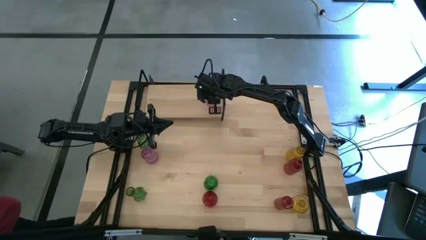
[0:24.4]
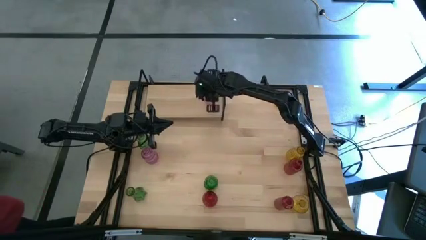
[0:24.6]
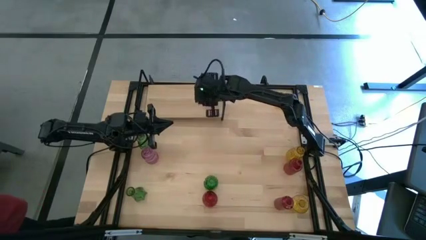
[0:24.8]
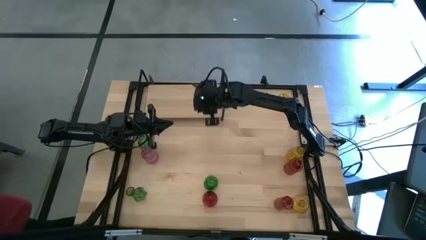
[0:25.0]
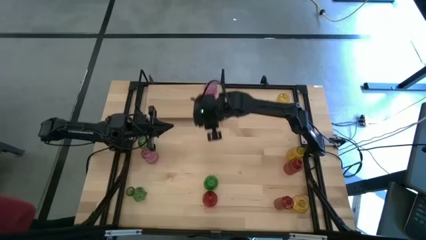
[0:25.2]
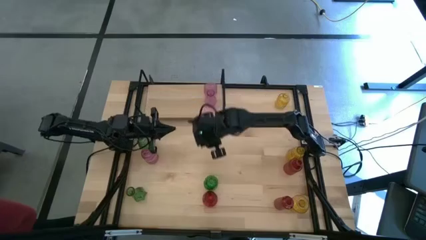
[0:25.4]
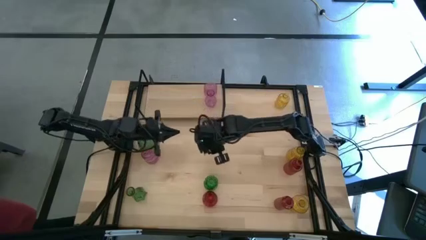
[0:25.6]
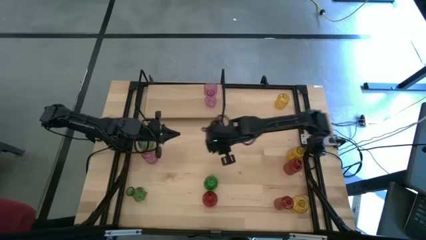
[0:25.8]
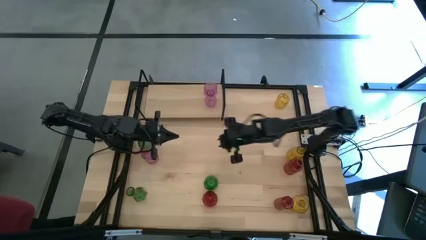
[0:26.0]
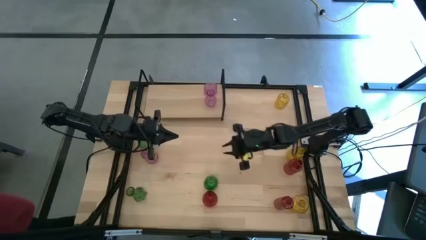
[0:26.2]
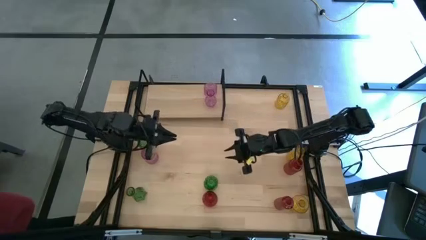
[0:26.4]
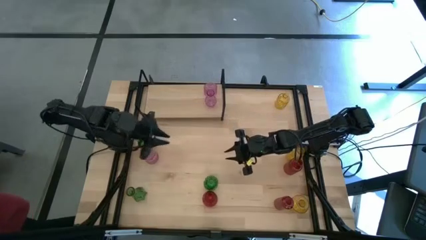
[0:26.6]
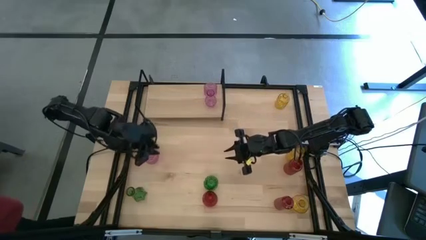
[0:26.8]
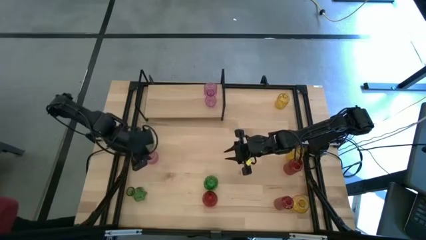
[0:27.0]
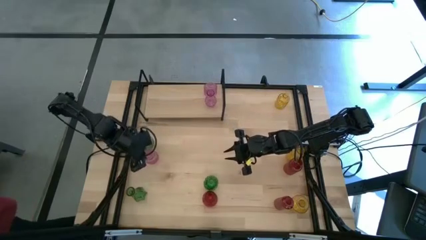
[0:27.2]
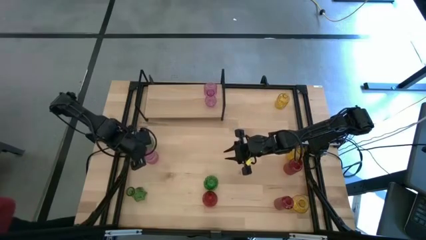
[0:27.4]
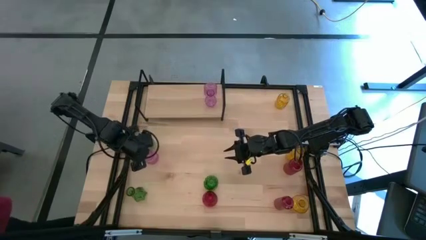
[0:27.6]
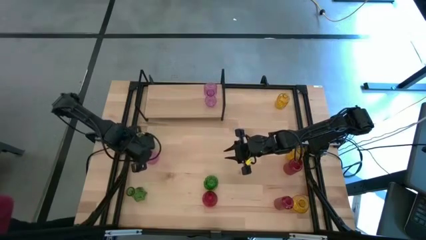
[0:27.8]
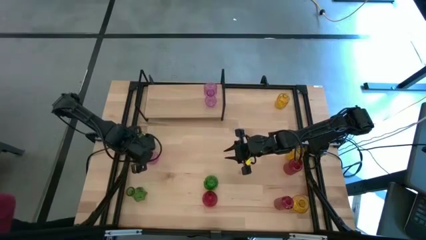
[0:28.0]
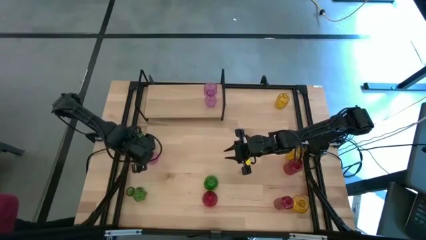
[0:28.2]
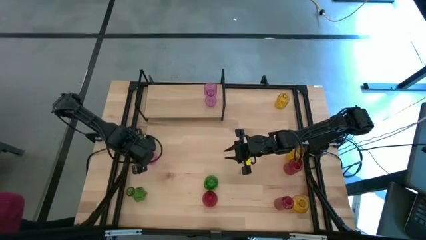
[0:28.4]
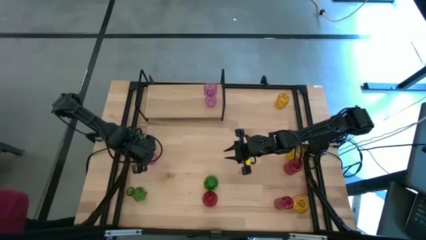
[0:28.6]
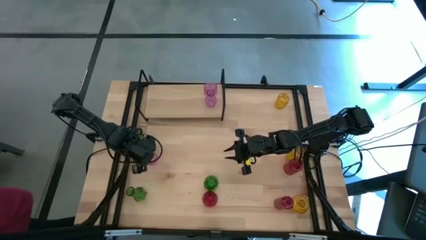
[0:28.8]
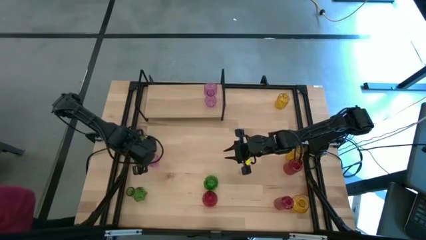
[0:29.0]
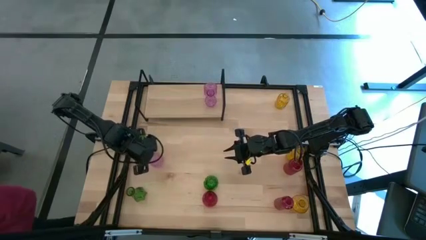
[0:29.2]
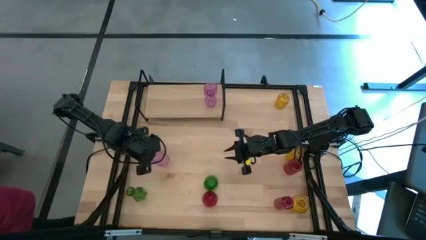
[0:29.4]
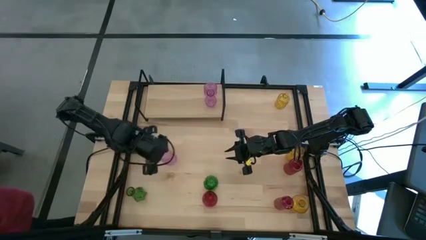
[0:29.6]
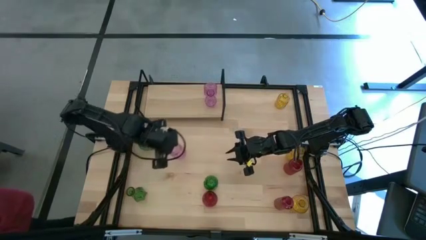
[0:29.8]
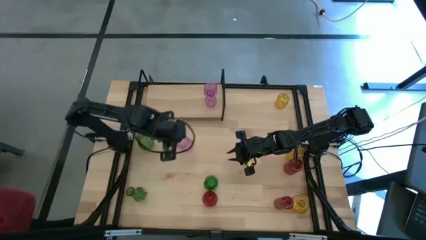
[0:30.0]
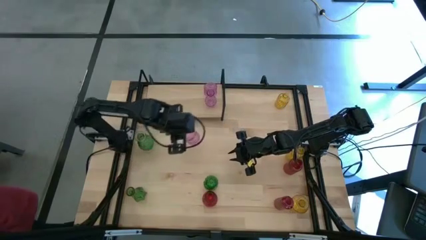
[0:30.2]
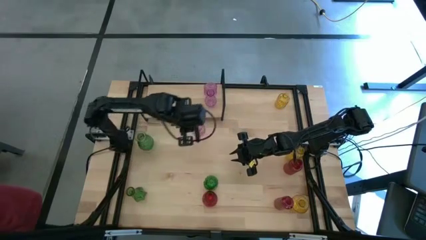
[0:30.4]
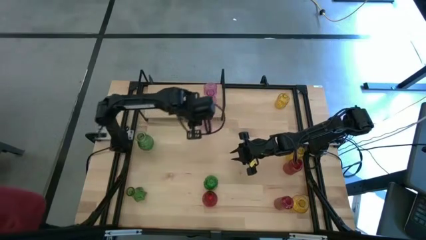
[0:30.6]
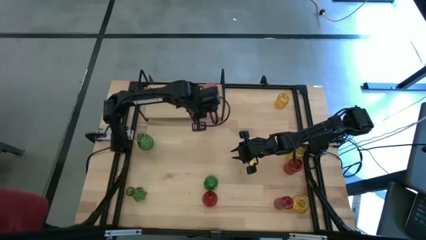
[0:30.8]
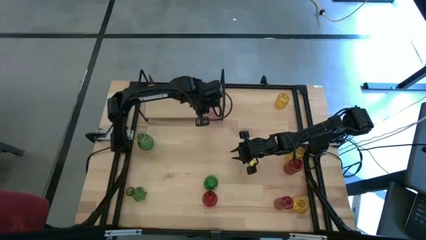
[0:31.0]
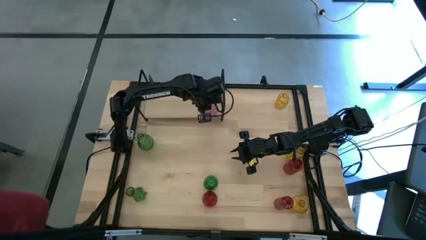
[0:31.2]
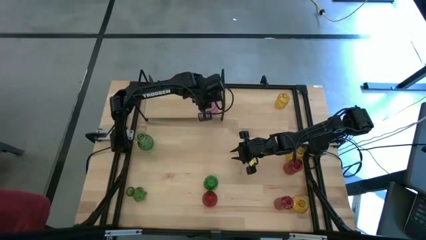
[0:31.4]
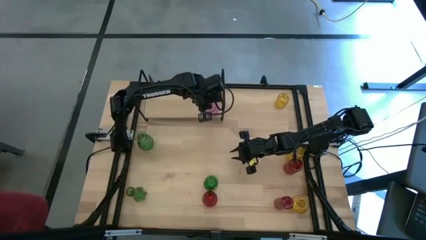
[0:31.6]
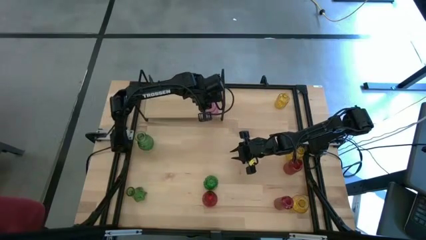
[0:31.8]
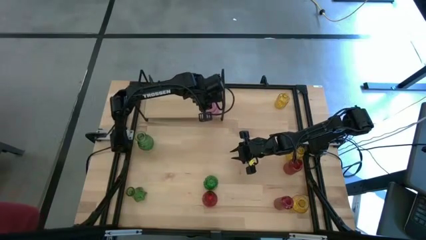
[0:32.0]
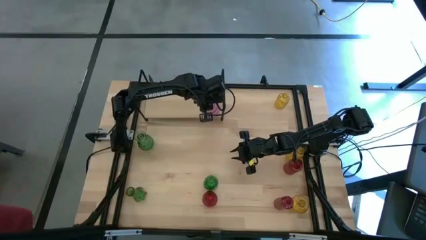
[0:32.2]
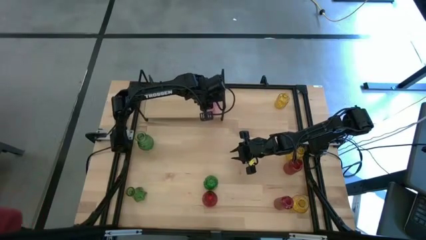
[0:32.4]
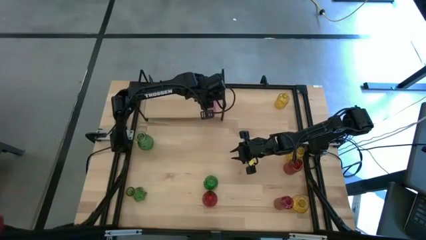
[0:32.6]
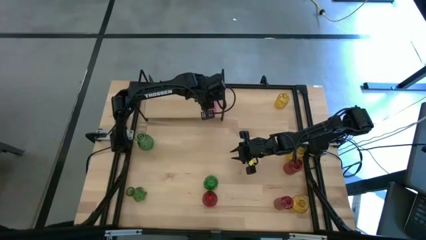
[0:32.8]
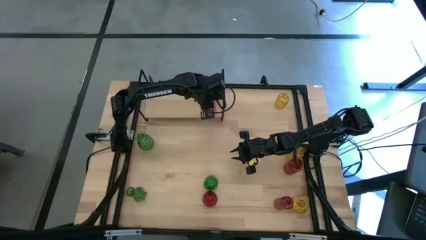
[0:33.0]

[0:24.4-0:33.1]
Task: sort vases onto shelf
Put the violet vase on the shelf aligned with the other violet vase

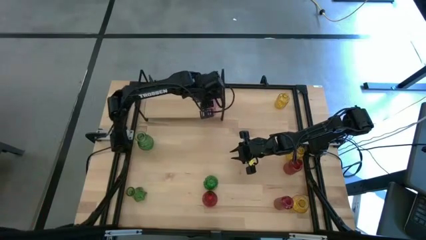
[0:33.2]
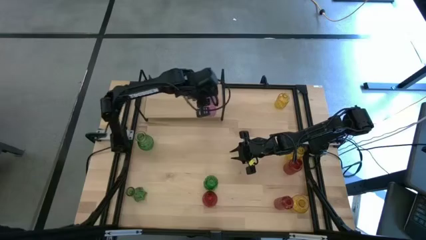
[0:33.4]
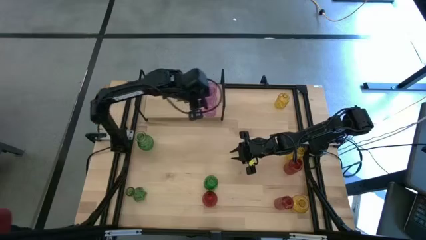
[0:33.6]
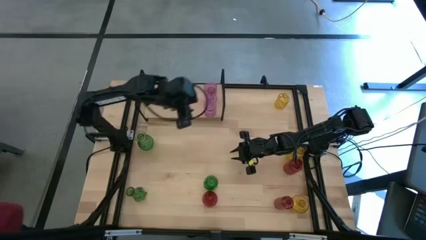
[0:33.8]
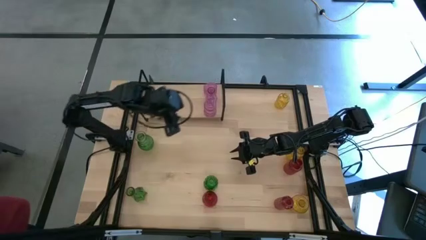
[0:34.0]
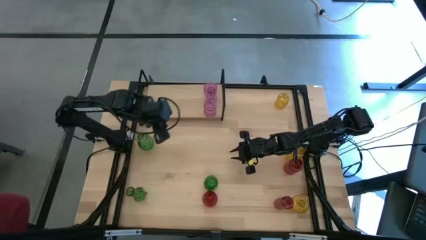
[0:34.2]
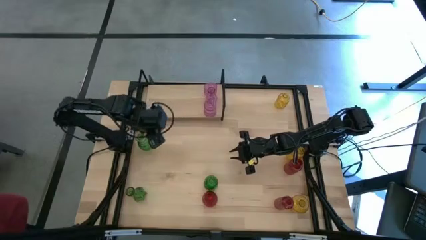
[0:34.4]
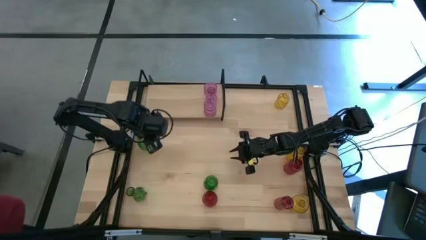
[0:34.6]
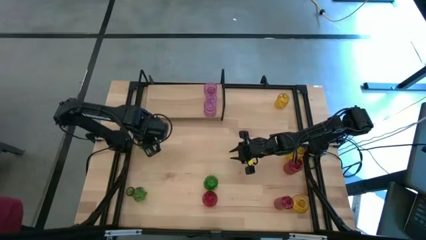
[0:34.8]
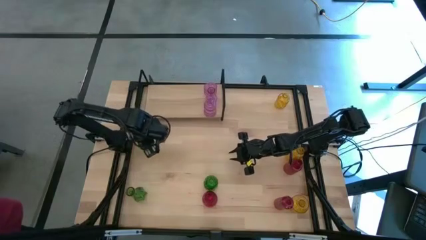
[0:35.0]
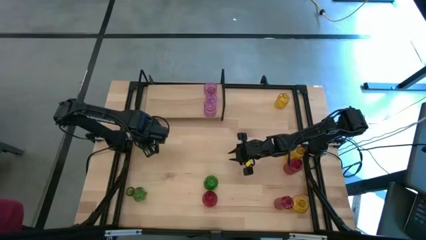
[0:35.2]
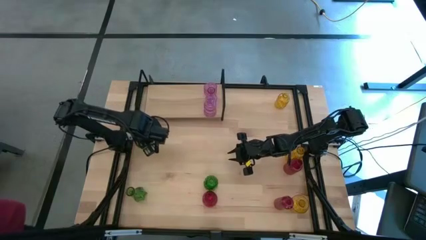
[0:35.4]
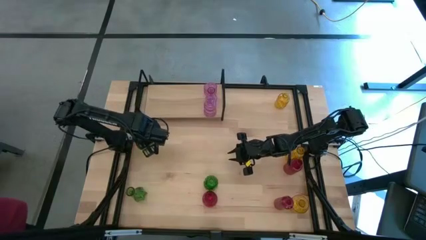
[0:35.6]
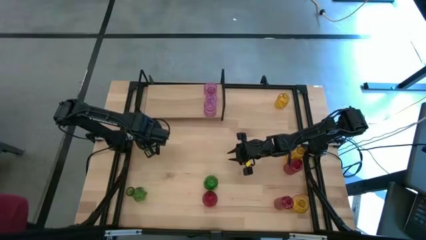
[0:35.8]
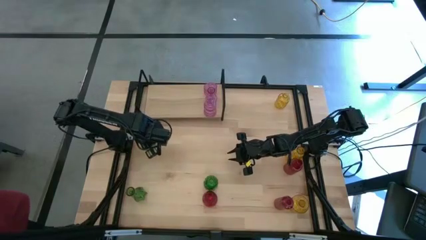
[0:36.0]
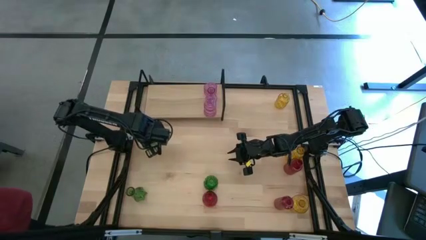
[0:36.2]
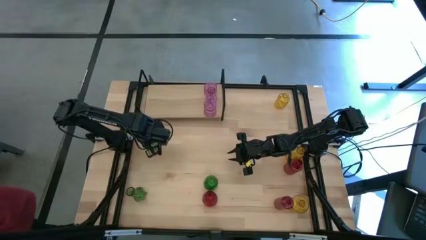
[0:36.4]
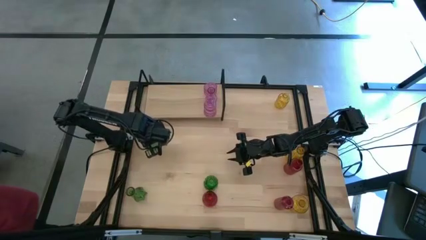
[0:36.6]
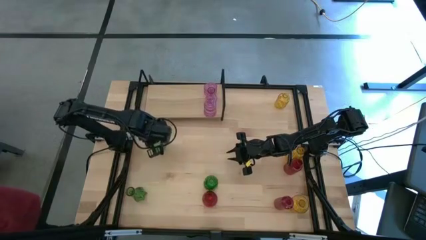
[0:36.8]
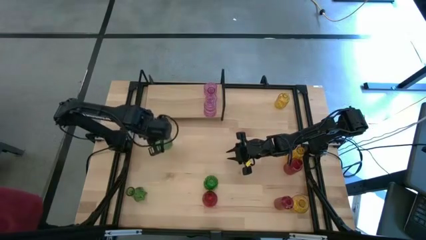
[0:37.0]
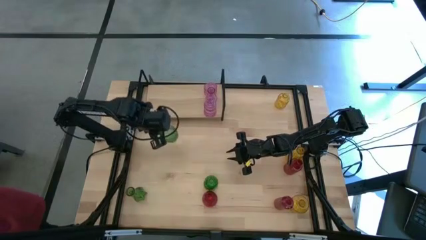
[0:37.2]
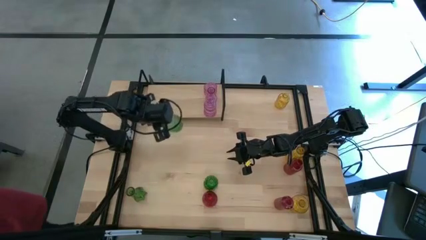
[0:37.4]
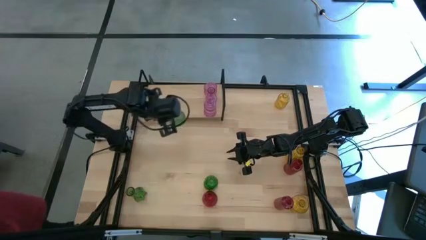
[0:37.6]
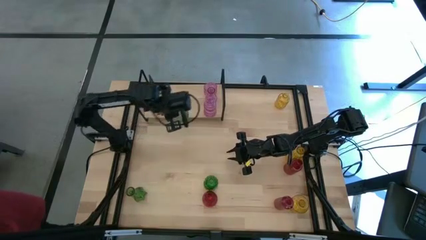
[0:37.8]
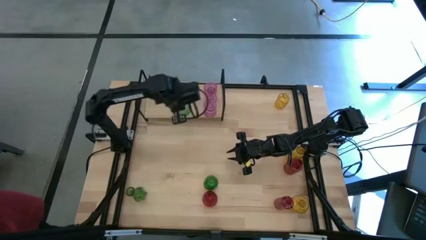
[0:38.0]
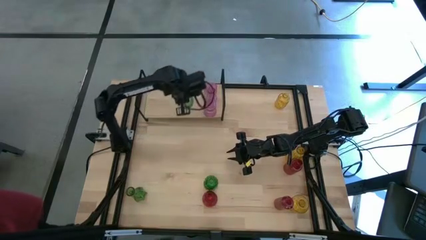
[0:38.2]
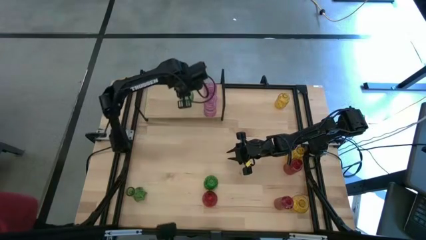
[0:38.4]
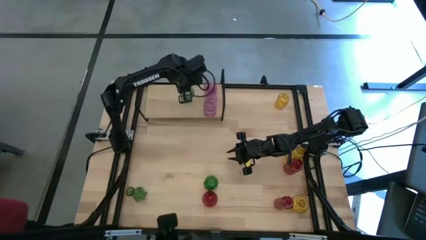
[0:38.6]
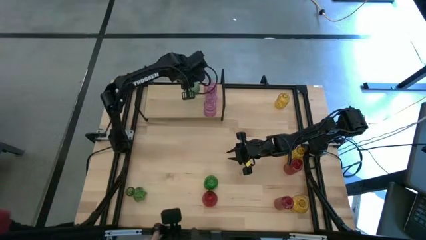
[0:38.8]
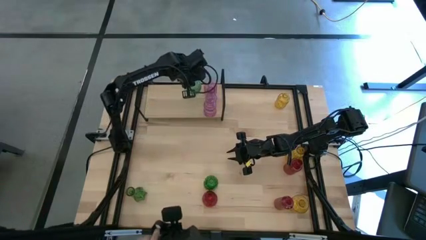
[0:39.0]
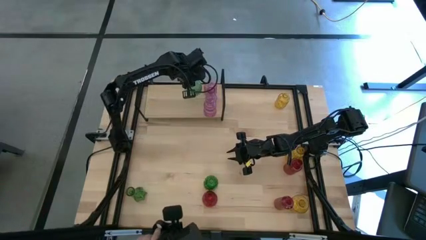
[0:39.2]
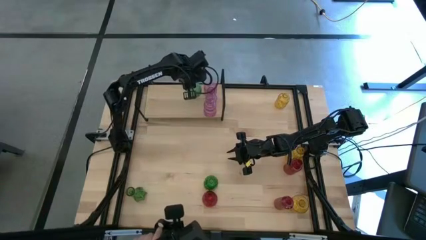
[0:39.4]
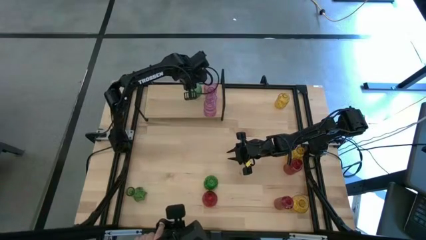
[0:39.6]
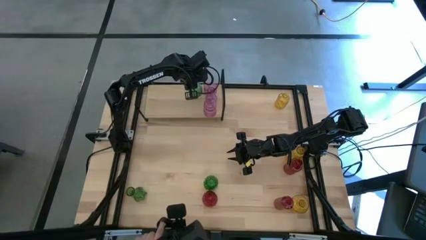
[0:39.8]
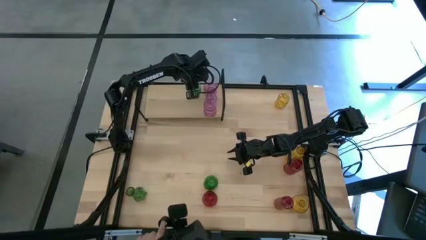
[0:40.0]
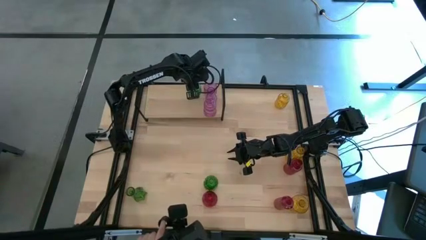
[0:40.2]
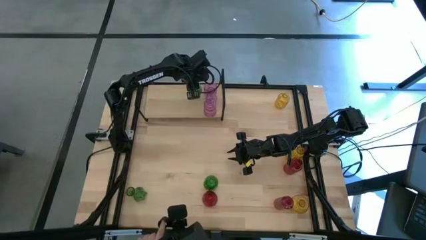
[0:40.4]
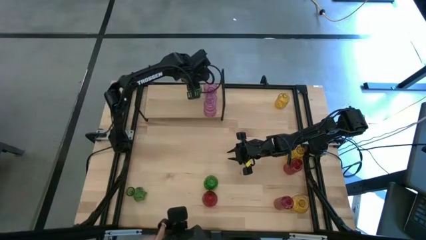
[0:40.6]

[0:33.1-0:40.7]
Put the top left green vase on the shelf

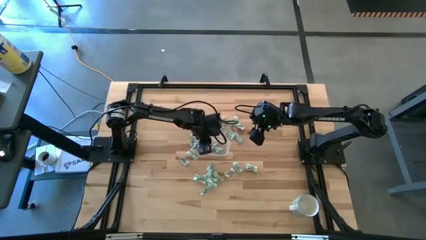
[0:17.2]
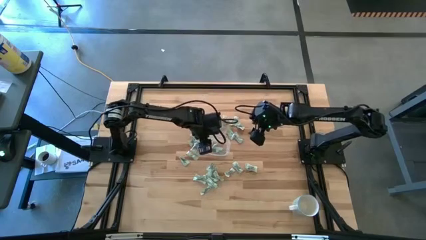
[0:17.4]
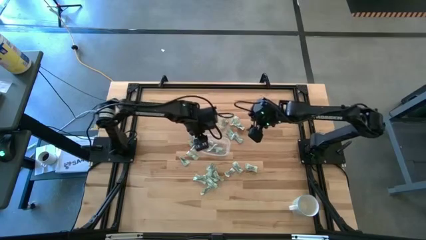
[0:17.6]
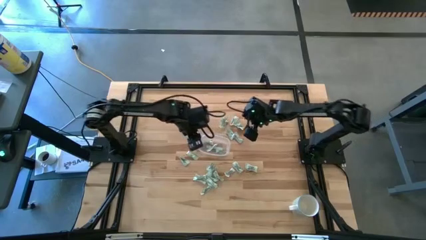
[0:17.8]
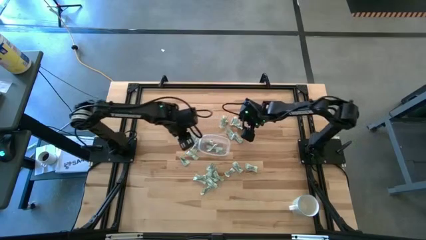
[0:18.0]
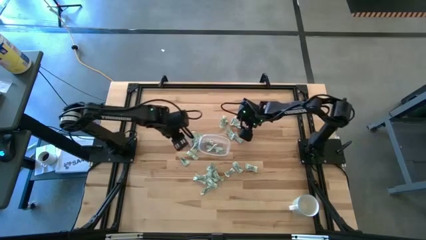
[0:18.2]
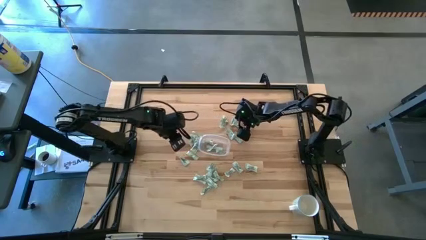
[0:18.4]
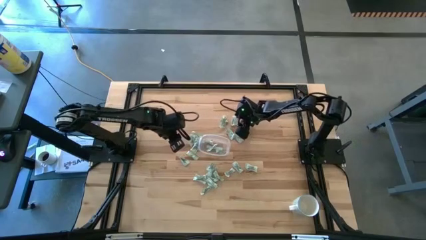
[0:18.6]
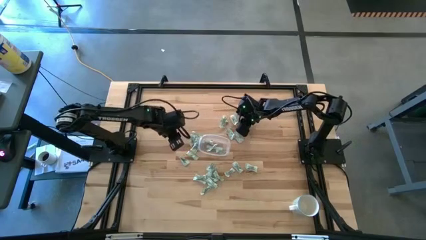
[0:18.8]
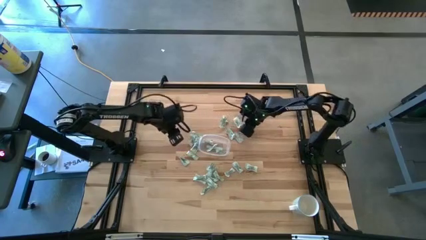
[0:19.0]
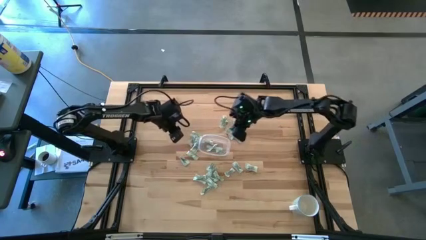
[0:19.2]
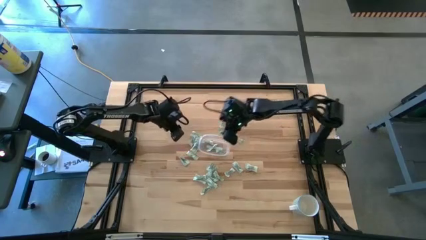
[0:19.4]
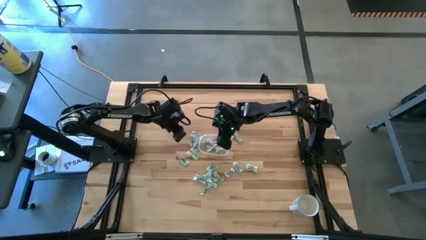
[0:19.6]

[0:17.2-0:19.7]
Task: Pick and place Stevia / Truvia into bins
Put the stevia packet into the transparent container
